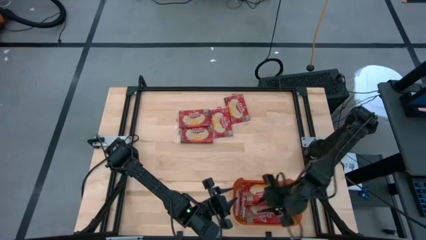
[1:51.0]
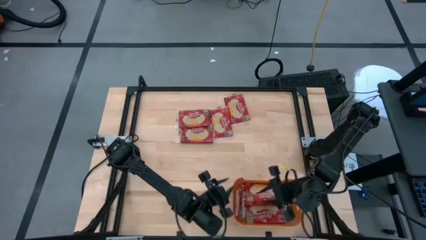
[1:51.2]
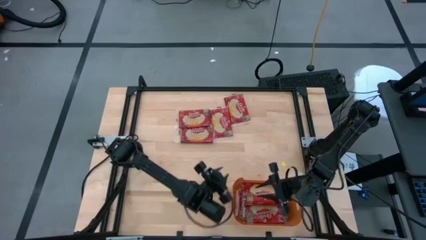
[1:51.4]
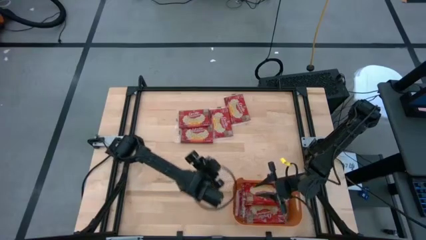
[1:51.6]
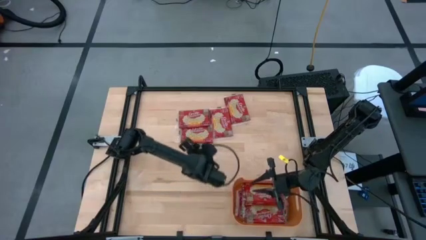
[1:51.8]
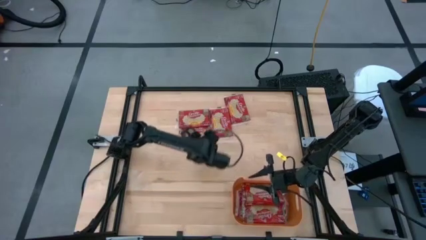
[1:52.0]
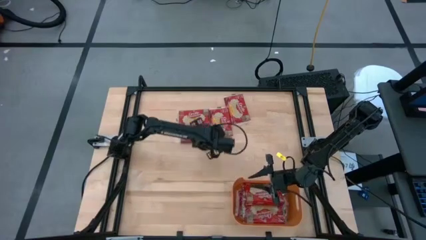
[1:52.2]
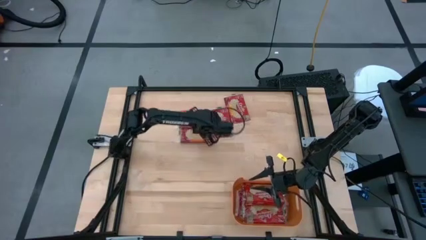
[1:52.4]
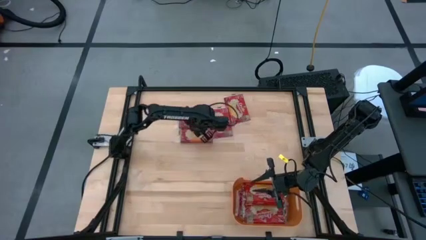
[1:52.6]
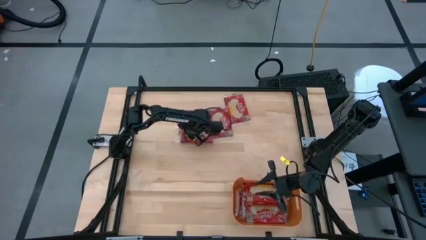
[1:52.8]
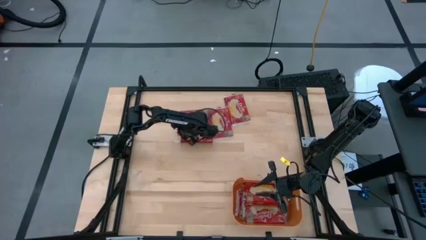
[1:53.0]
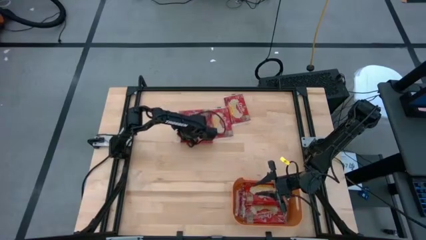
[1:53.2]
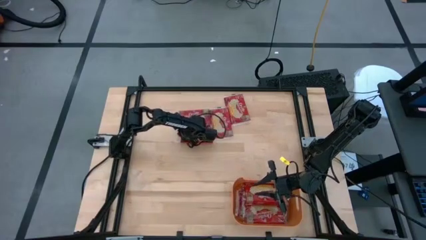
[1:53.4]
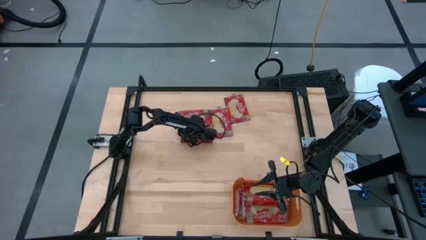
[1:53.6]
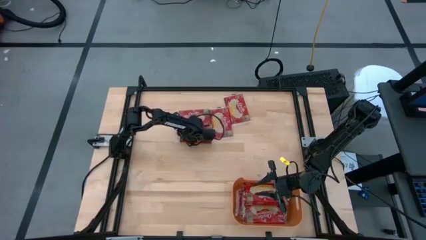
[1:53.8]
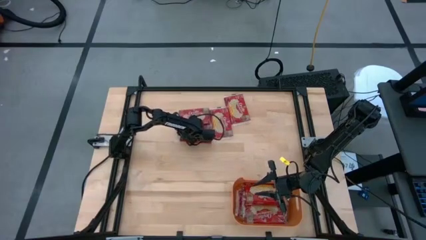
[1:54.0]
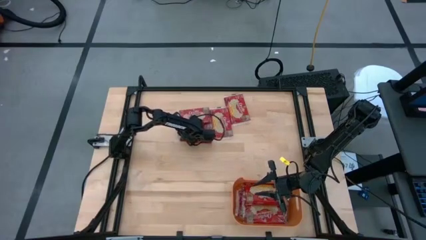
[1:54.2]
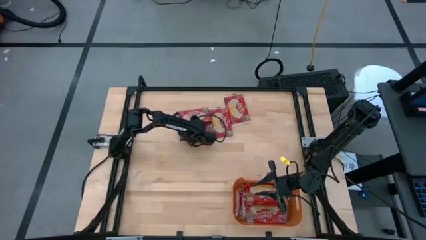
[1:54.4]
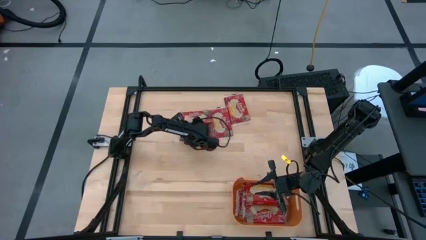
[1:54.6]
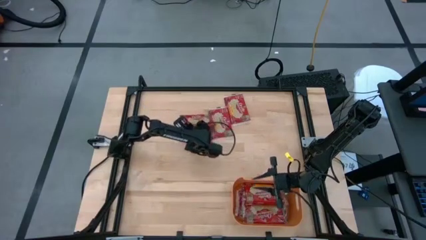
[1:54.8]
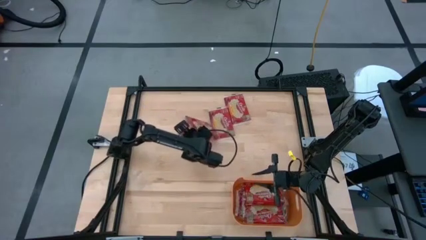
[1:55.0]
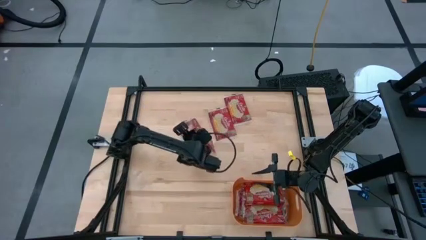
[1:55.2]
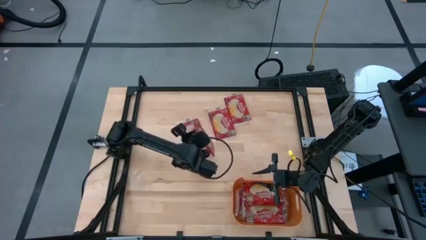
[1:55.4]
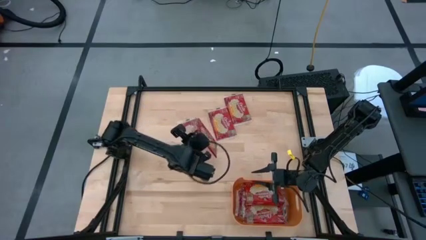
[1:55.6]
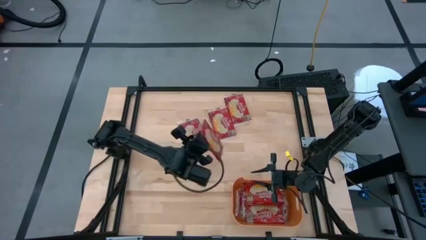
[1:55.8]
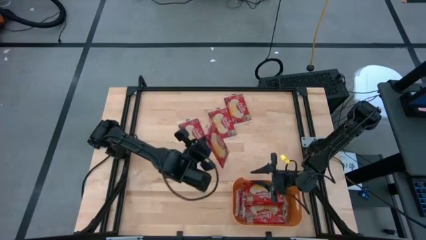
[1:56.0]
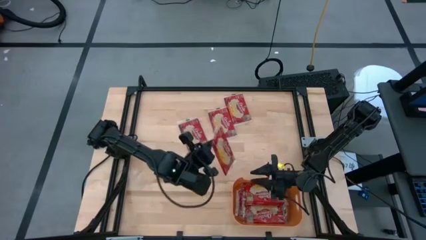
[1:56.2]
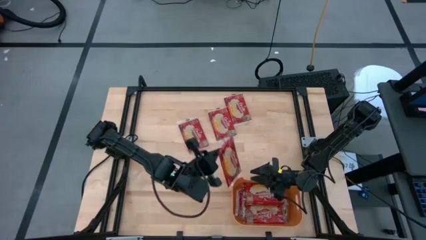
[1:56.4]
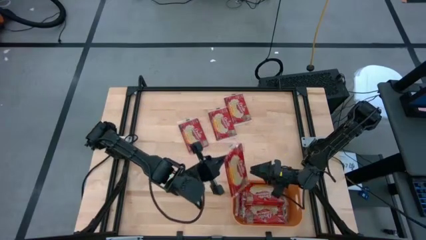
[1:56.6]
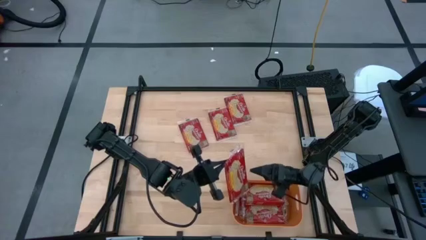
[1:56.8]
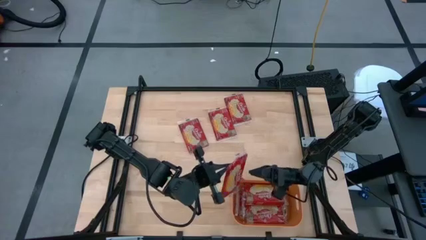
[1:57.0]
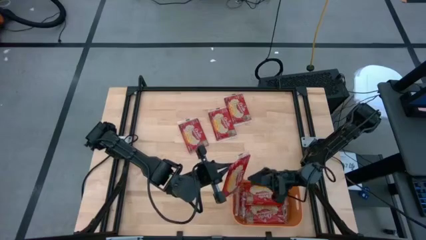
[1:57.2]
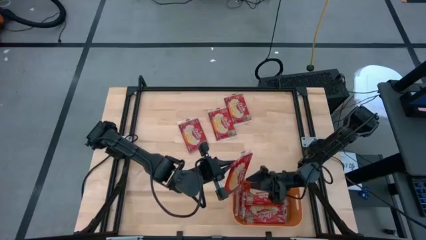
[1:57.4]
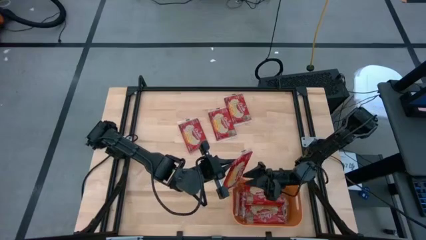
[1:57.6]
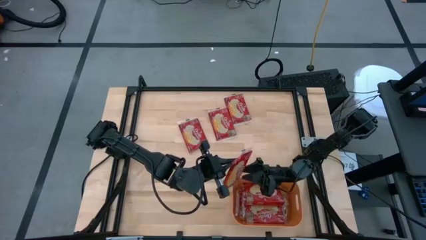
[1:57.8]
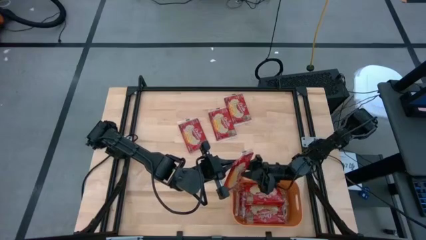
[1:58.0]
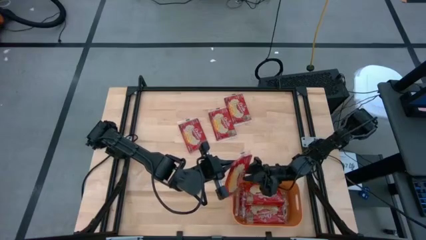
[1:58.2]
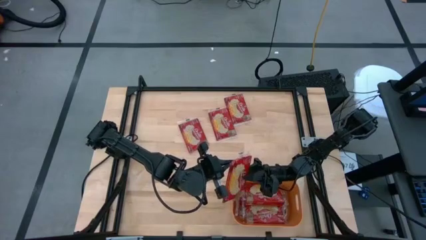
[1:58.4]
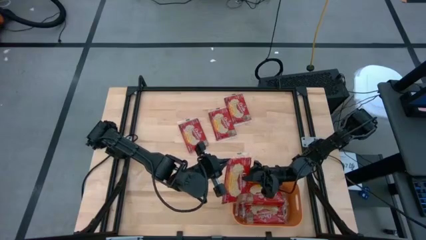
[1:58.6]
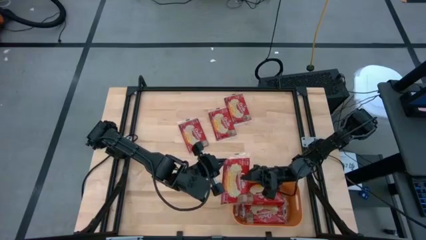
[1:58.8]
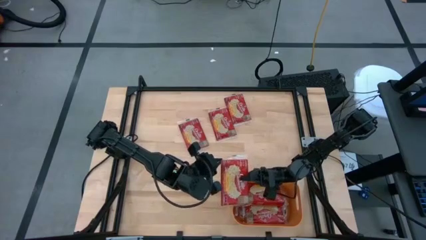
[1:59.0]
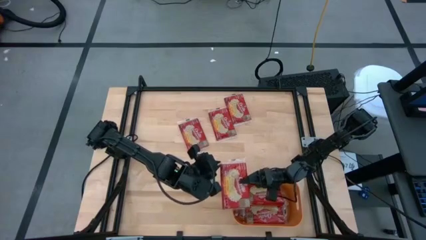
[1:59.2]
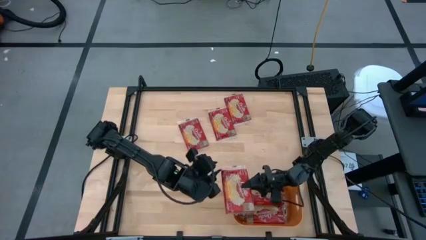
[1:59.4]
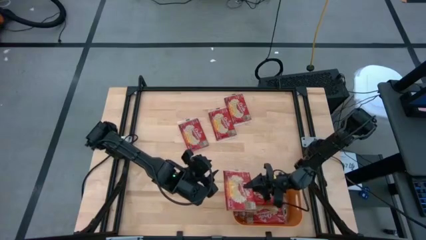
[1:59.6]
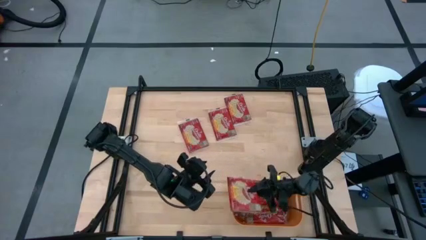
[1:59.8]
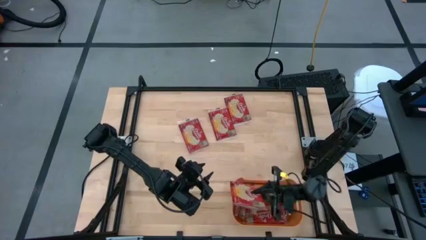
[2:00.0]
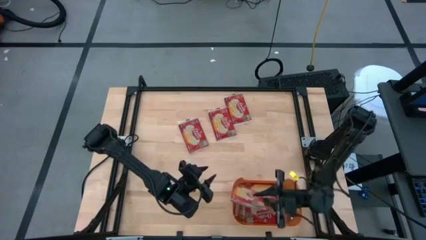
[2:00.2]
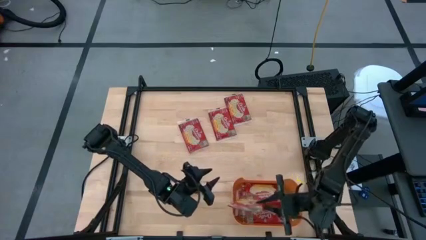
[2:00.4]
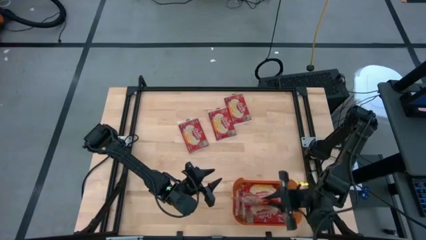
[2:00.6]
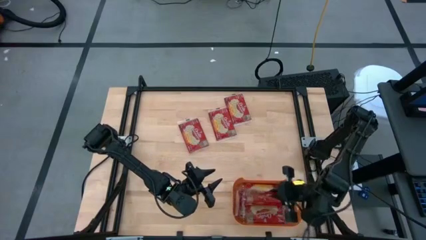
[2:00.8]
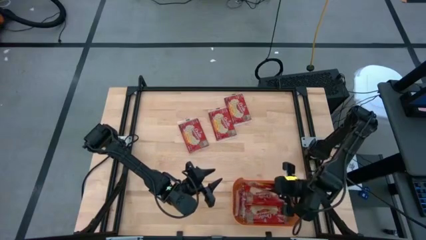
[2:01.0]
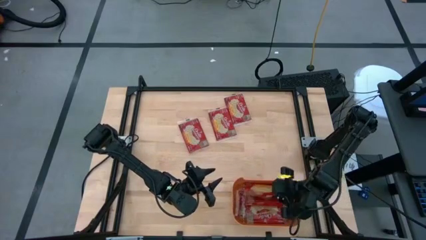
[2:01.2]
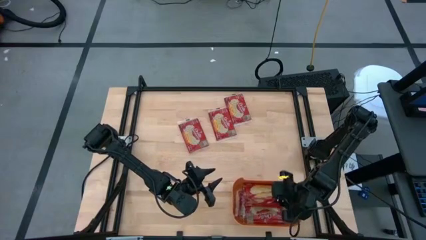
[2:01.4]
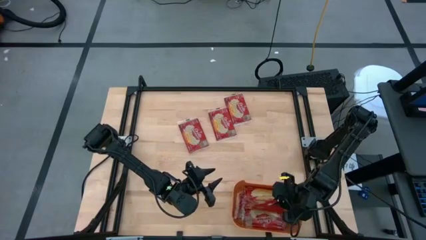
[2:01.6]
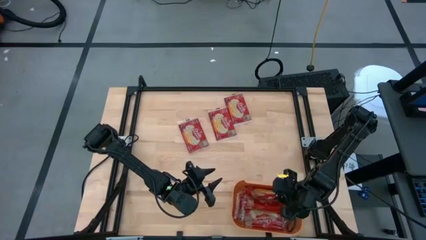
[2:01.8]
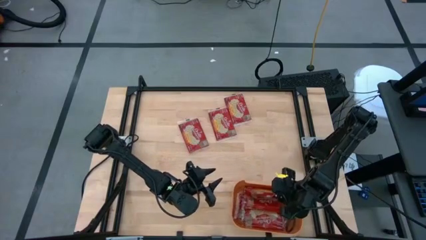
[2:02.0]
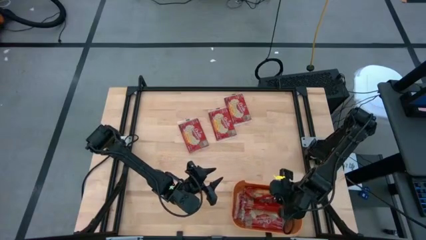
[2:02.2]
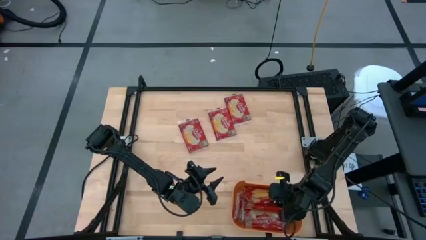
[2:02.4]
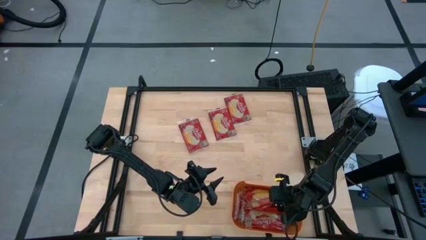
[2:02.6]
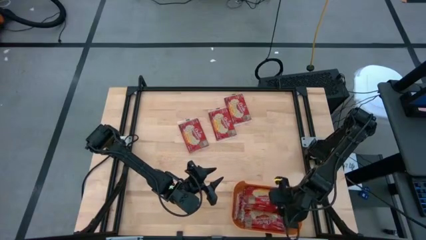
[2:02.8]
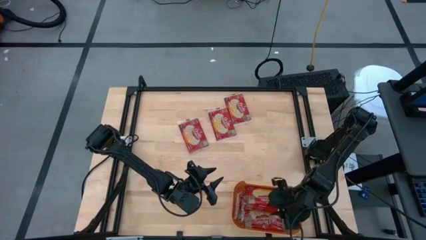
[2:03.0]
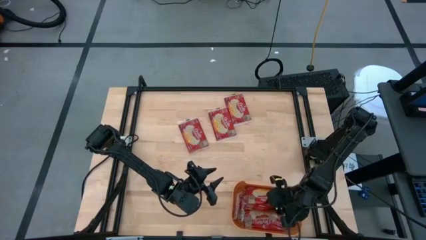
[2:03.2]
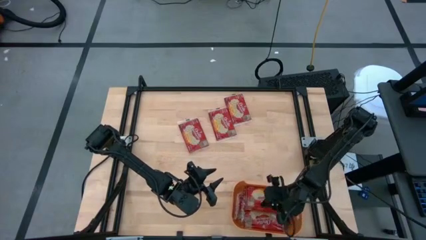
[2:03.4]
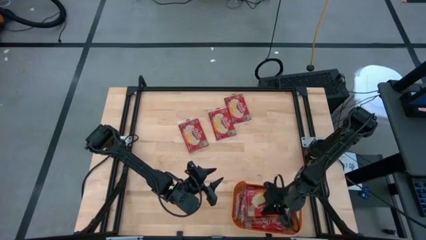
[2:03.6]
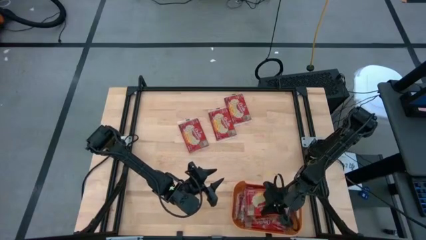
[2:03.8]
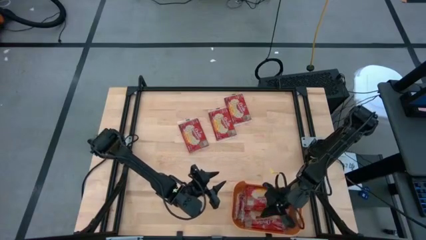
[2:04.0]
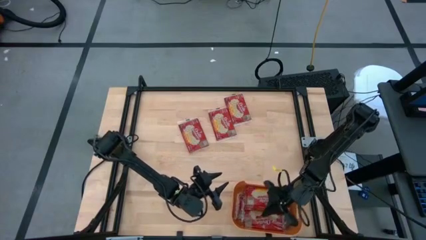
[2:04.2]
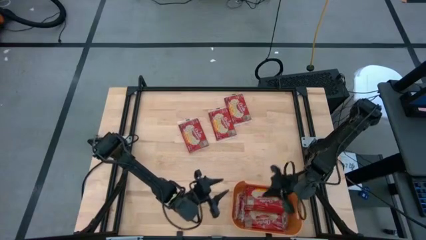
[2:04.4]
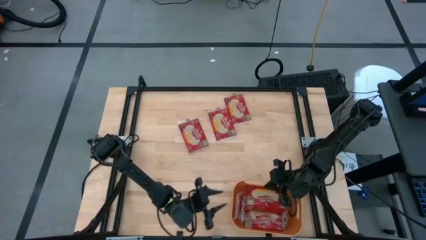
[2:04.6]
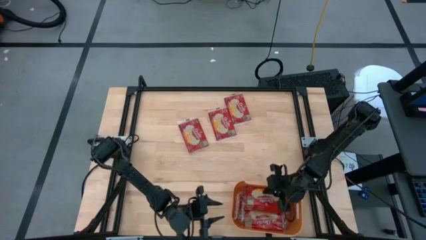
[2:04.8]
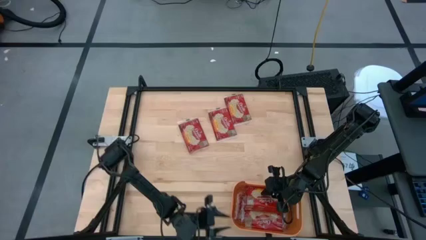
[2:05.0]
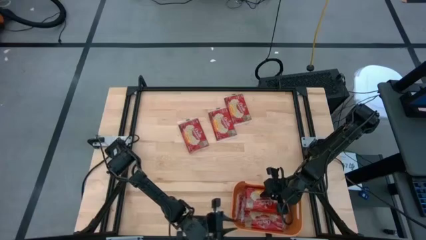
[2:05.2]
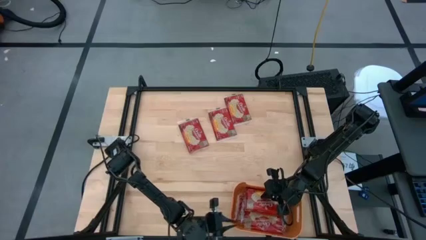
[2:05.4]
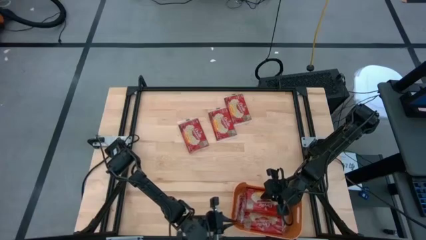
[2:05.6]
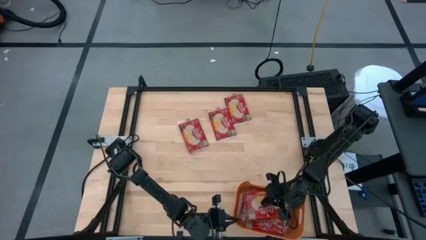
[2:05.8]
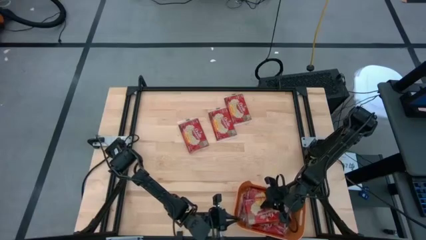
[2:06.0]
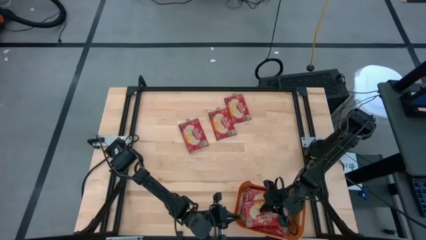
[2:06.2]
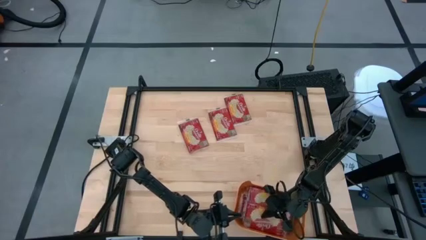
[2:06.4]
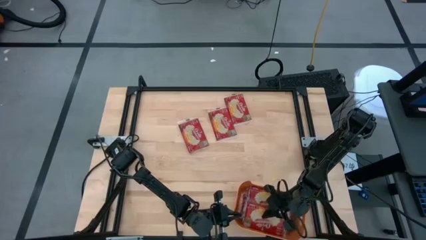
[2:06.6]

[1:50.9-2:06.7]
Task: Sort popcorn bags into baskets
Put the red popcorn bag into the orange bin

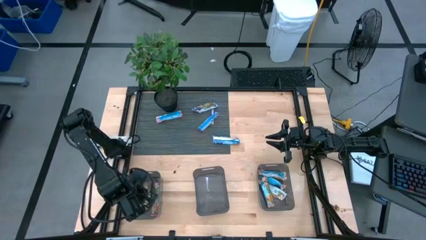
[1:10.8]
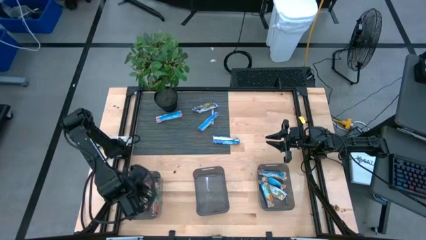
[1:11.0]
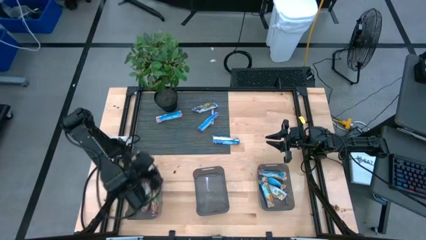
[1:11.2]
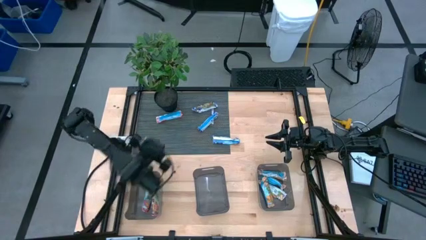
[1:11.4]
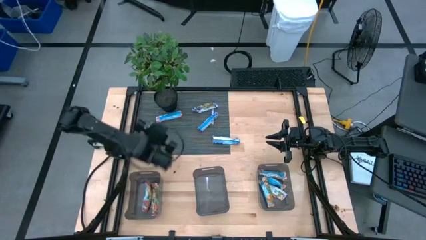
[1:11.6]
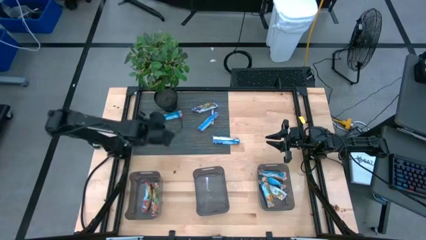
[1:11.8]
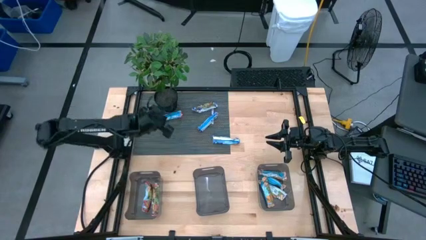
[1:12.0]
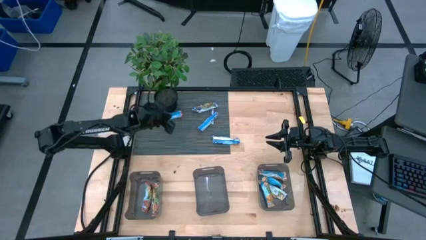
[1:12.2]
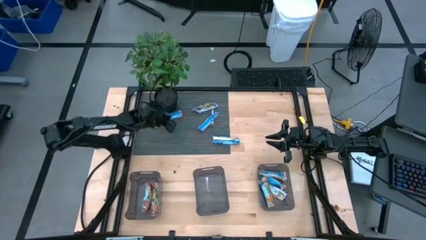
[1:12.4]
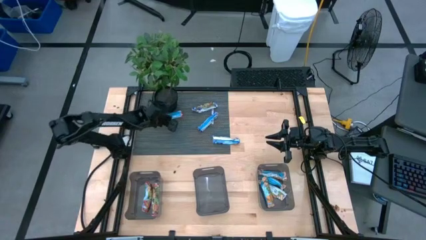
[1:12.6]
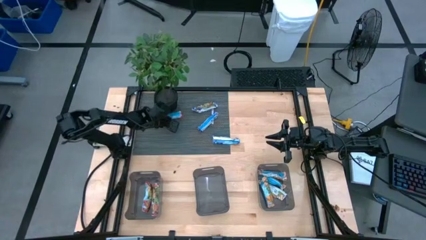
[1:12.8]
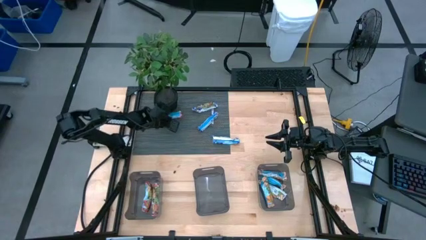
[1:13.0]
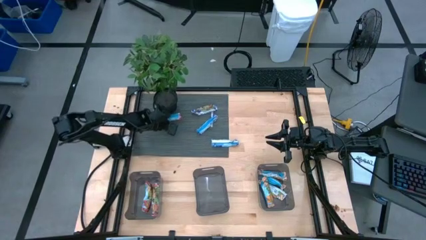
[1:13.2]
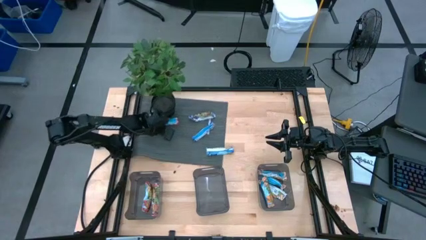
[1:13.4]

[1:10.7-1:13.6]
Task: Pick and place Granola Bars by type
Adjust the red granola bar
